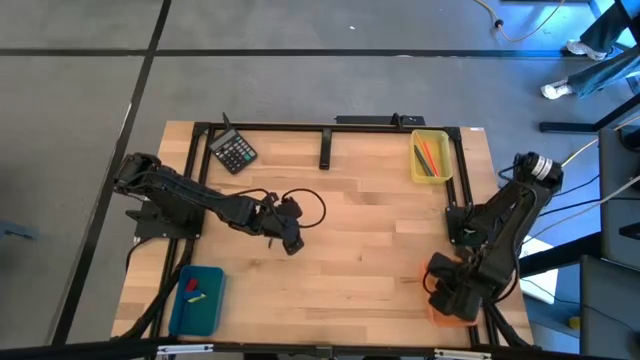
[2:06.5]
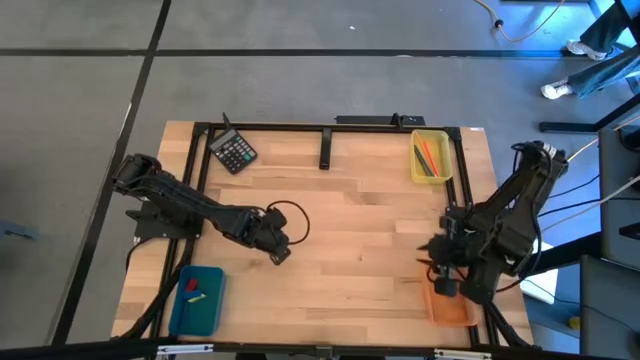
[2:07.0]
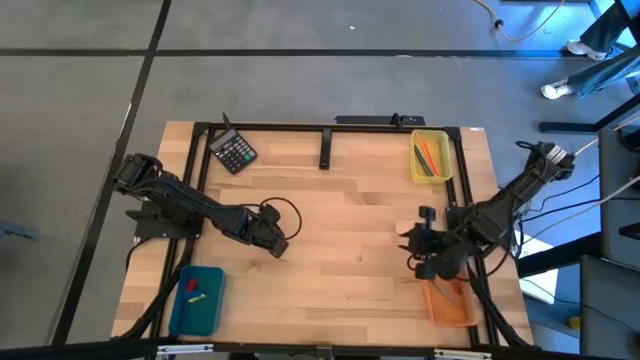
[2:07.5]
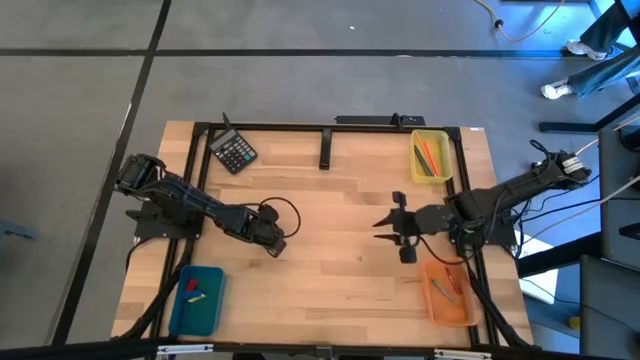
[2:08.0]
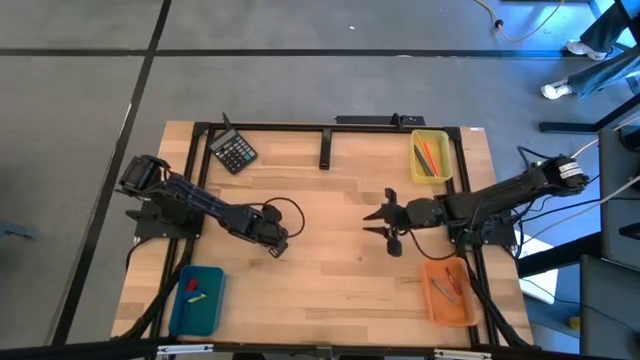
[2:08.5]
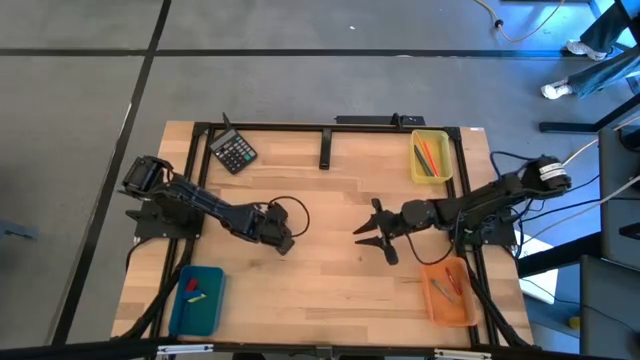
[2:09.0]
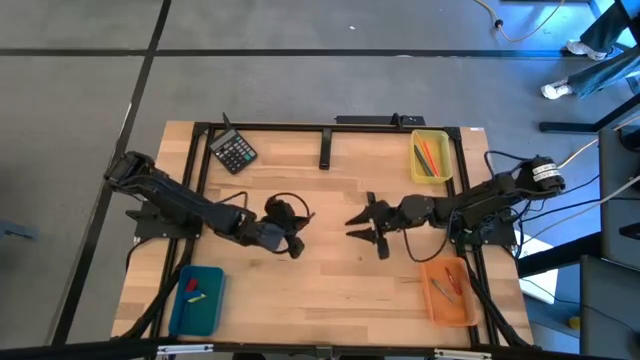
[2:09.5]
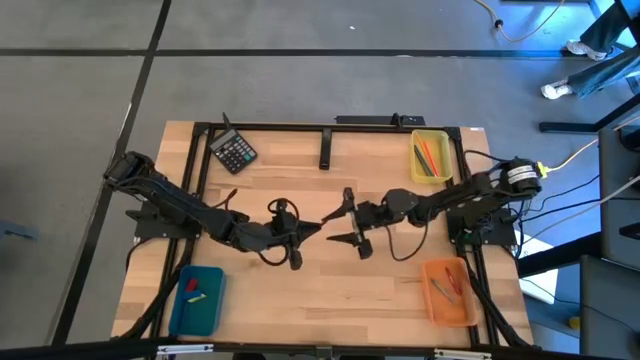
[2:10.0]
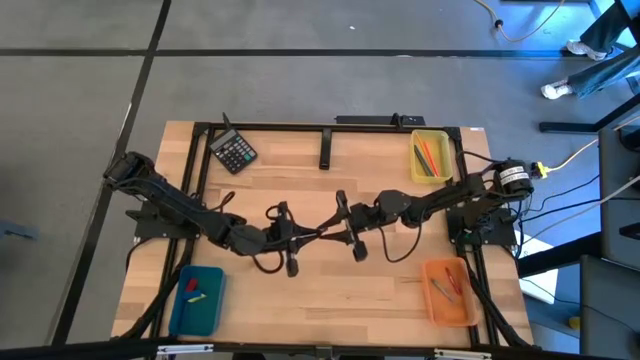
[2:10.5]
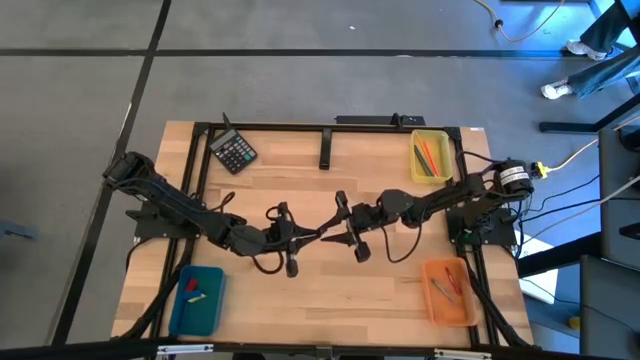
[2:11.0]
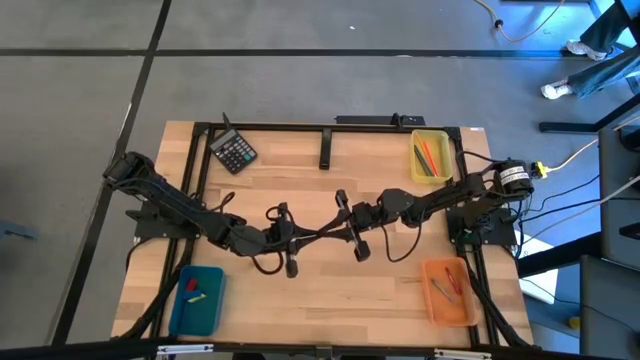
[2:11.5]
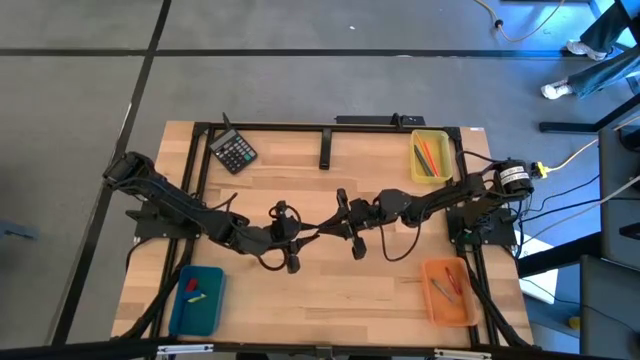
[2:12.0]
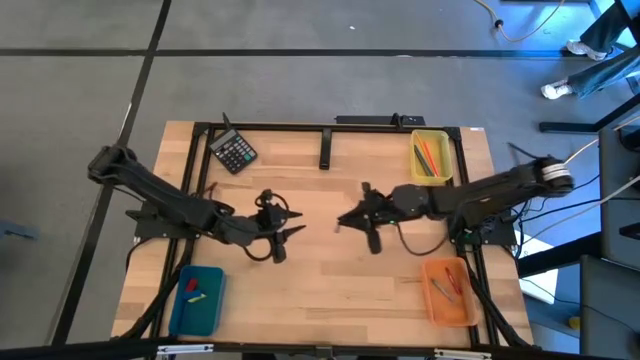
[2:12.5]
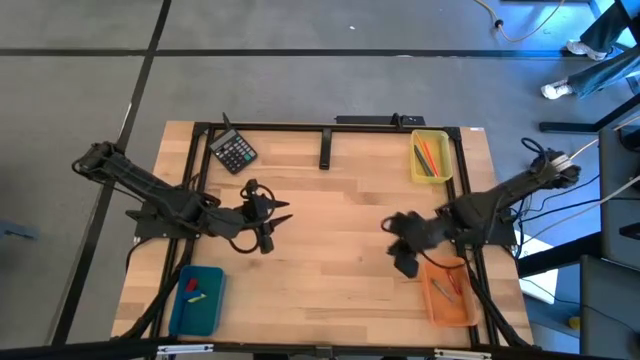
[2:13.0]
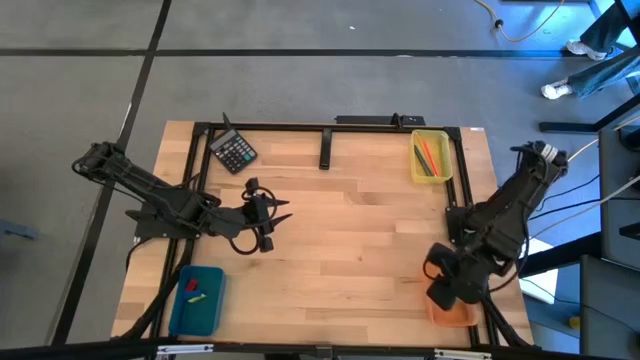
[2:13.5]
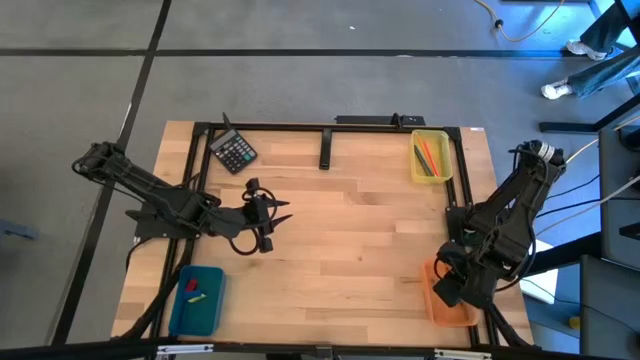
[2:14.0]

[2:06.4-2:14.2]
Task: Sort crayons/erasers/pens/pencils in bins
Put the blue crayon into the orange bin

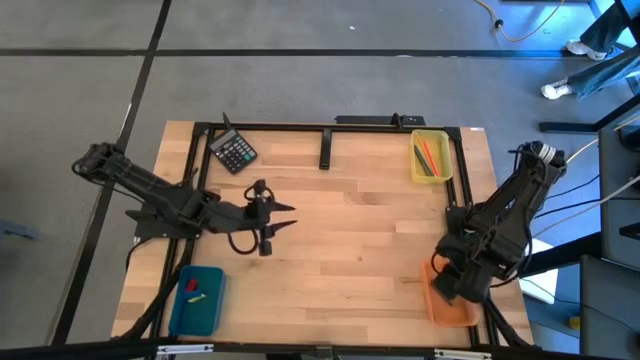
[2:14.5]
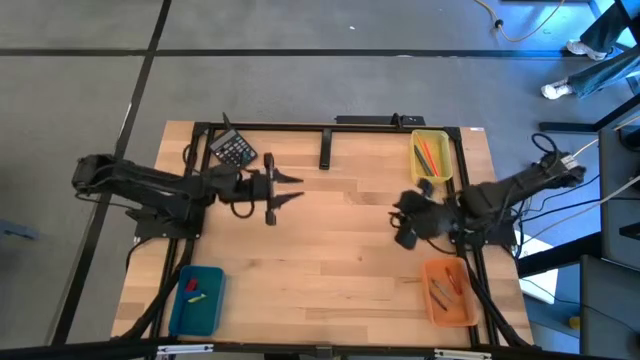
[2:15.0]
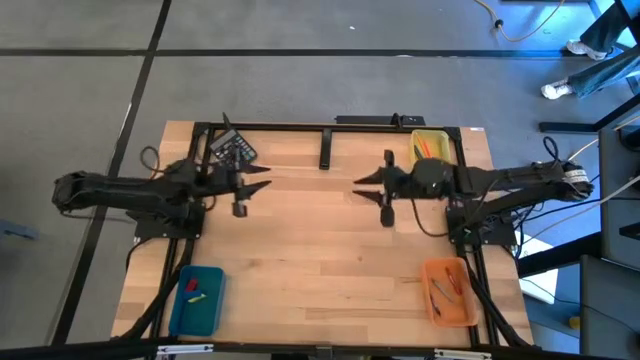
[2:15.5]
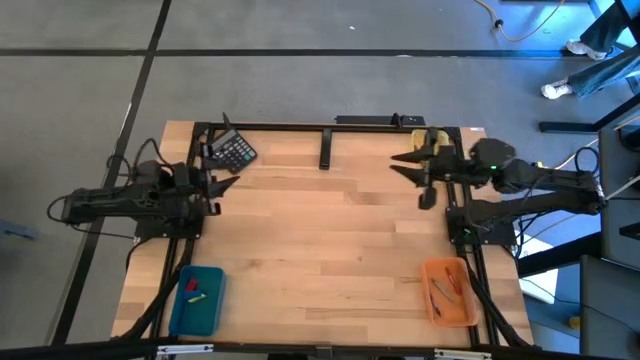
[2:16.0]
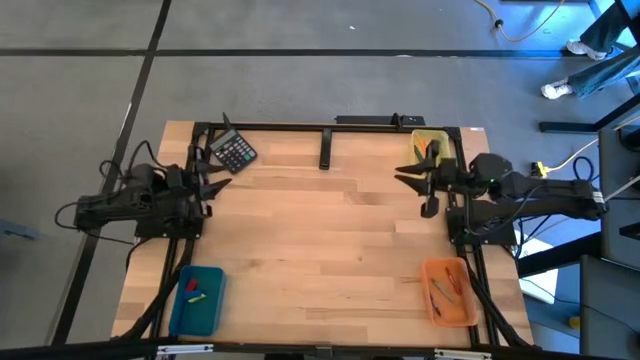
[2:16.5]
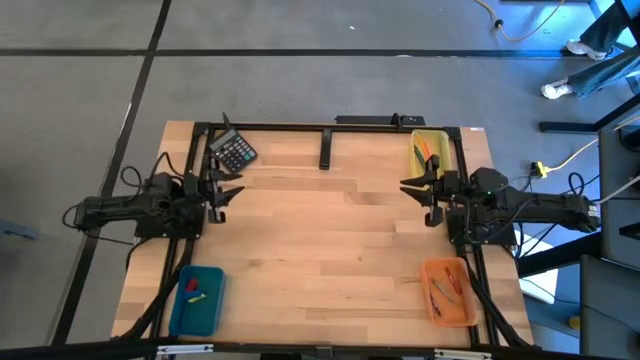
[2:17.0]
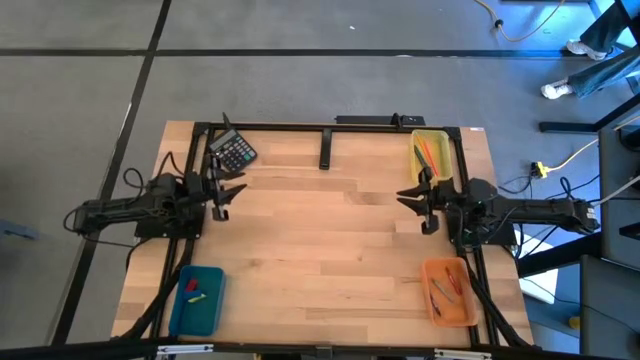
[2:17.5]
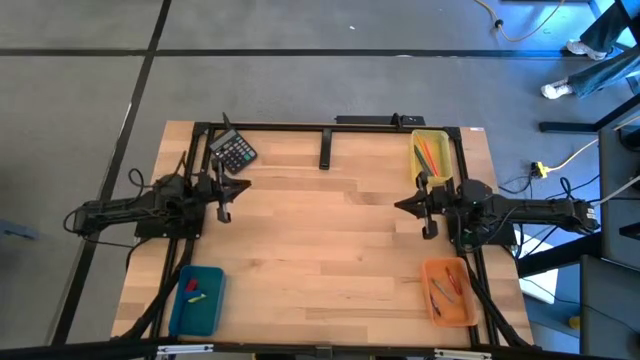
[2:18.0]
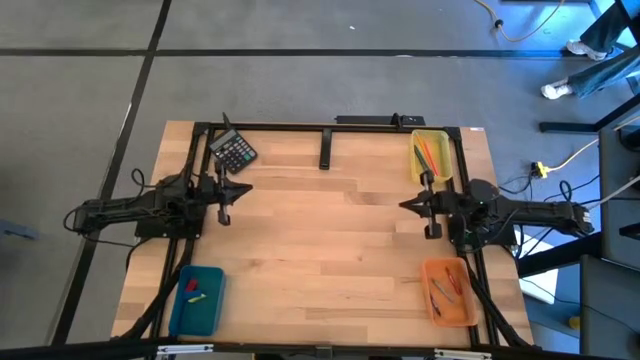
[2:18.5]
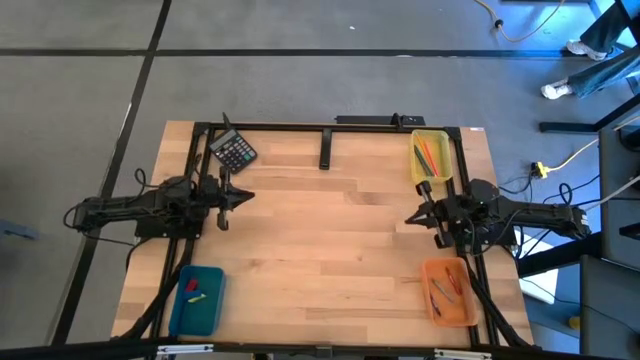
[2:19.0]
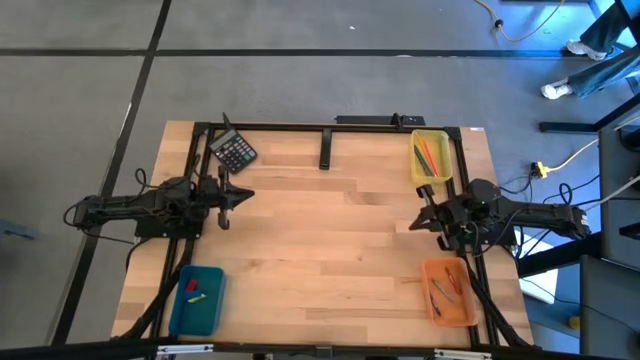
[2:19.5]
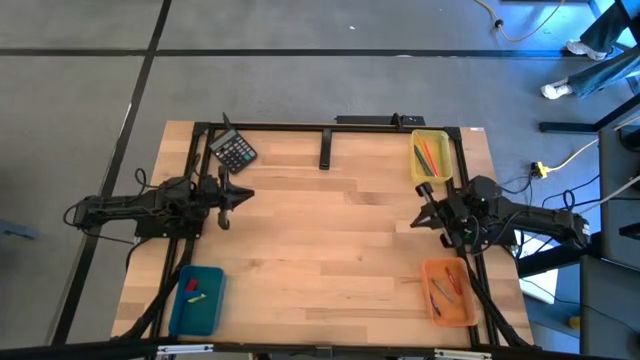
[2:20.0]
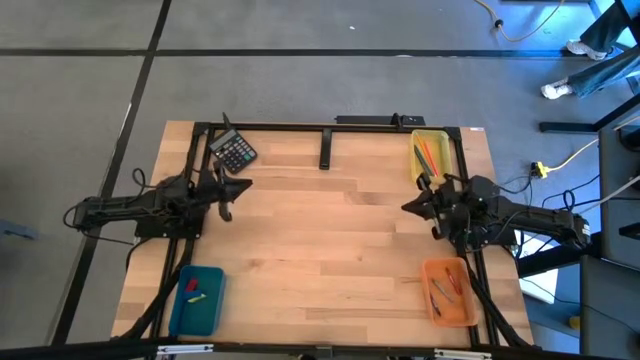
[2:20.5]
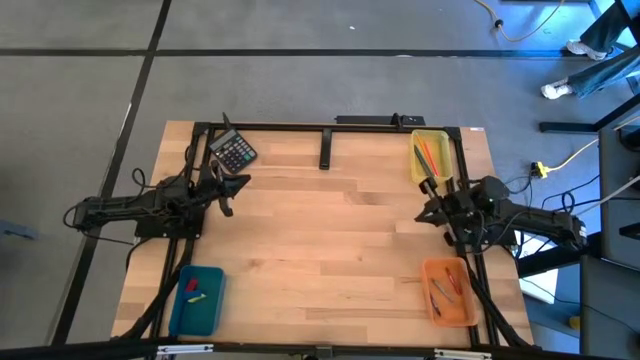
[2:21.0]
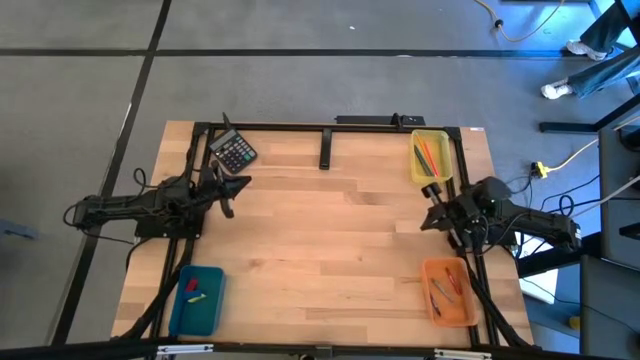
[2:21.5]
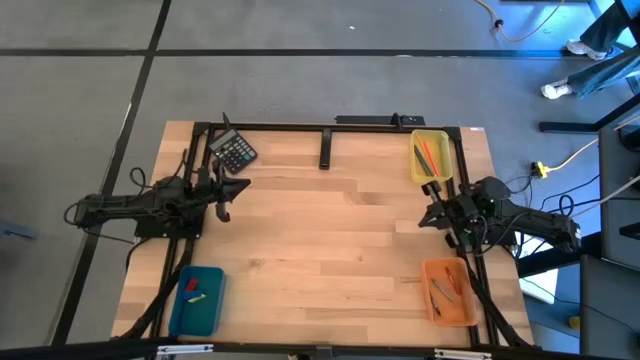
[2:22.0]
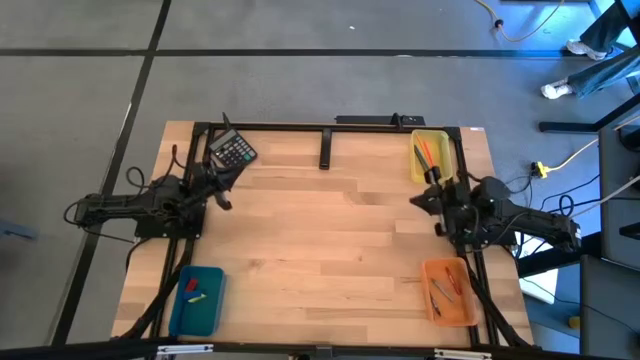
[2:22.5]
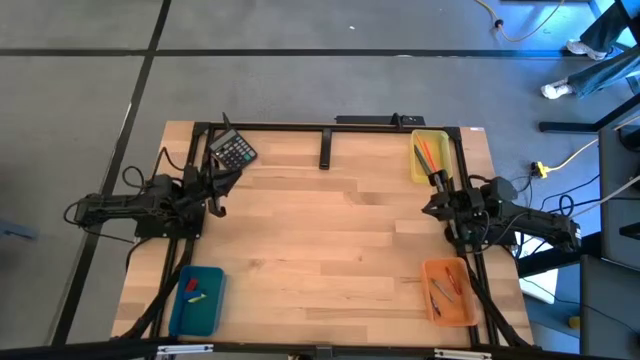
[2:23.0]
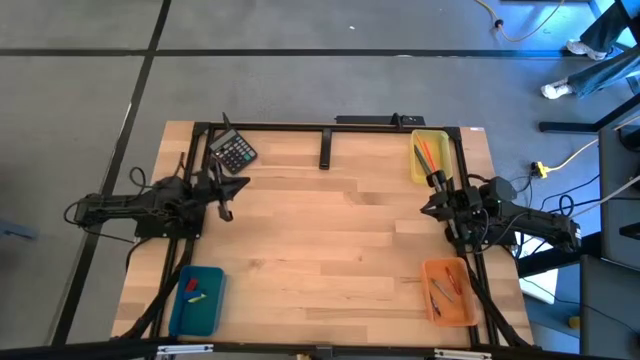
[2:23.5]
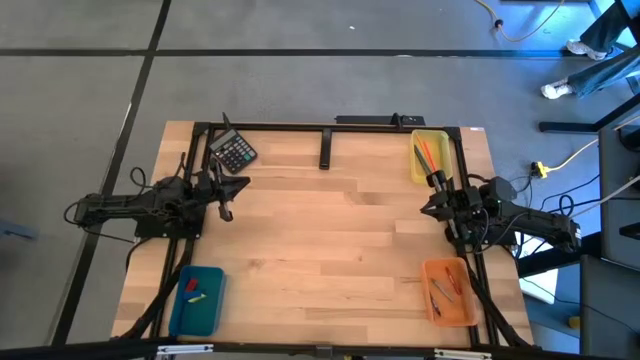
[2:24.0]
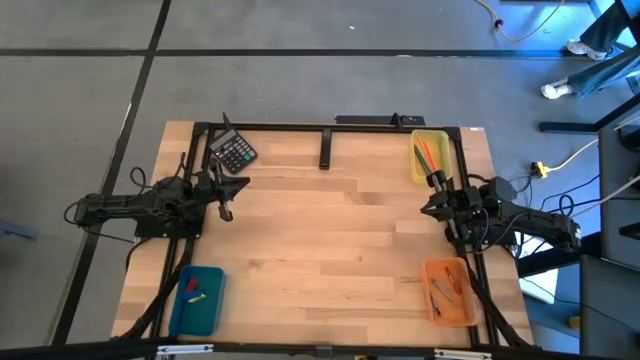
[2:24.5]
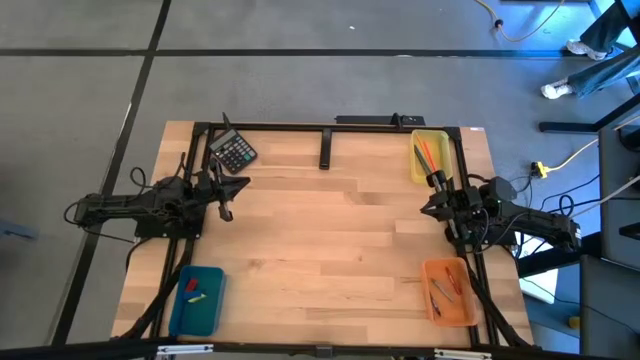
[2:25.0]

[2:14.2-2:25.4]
Return to Home Position

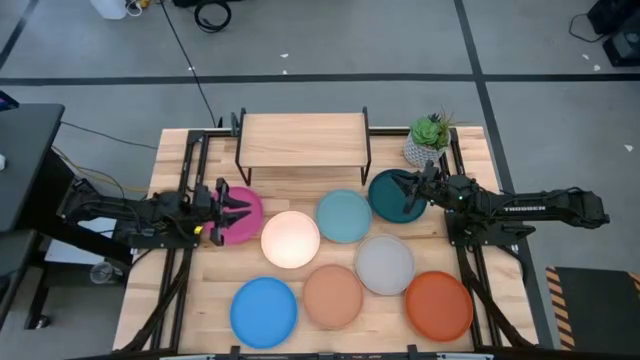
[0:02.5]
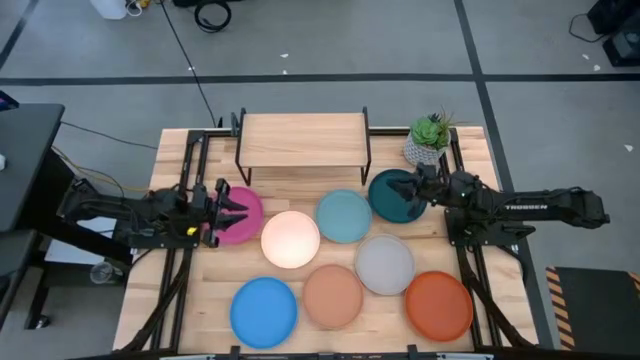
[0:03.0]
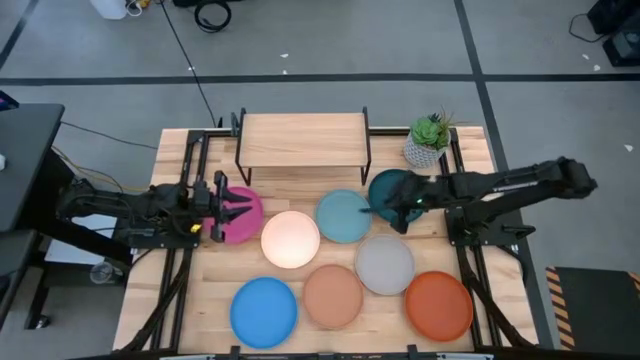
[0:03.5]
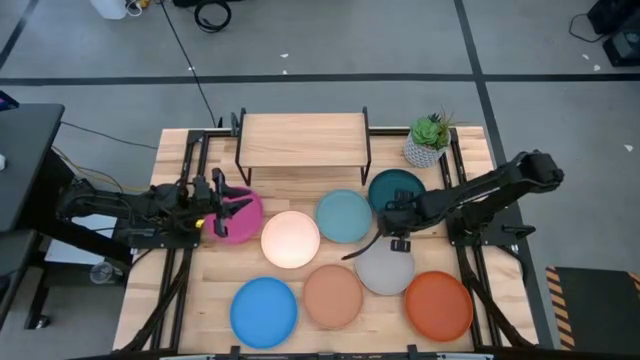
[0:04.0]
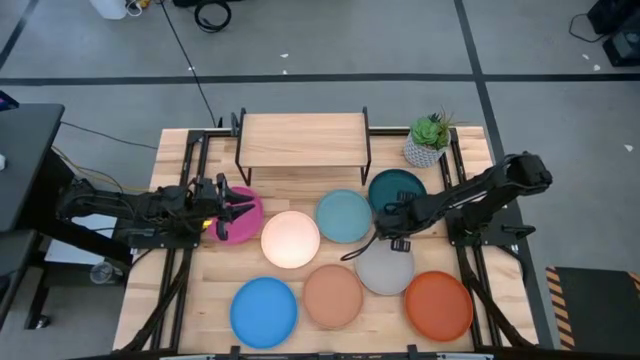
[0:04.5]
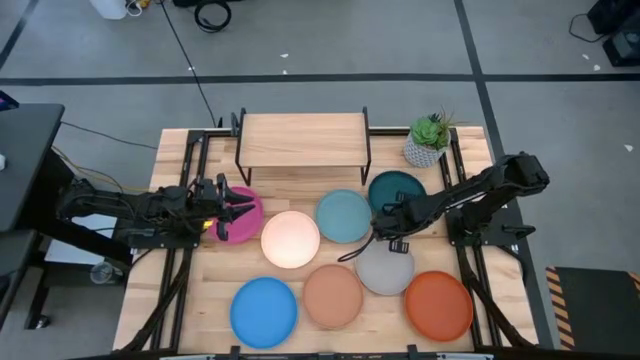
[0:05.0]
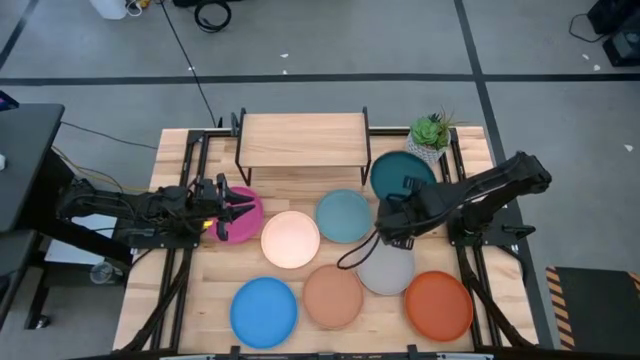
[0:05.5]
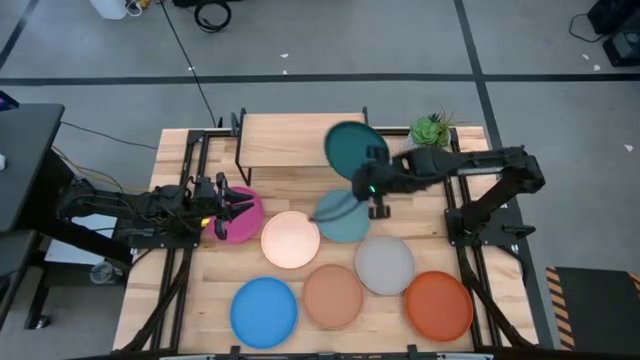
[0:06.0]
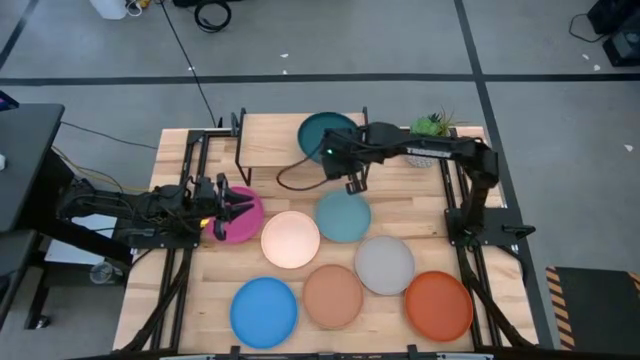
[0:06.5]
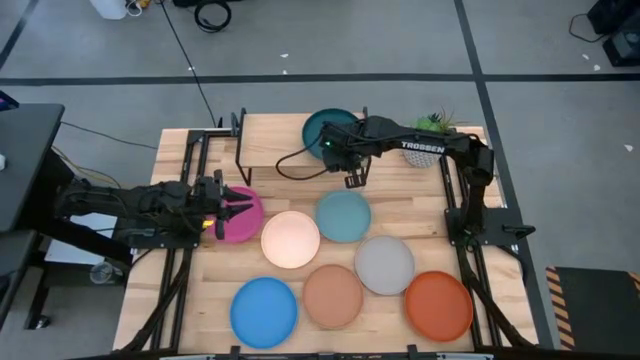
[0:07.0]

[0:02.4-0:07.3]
Task: Place and stack plates onto a shelf
Put the dark green plate on the shelf
